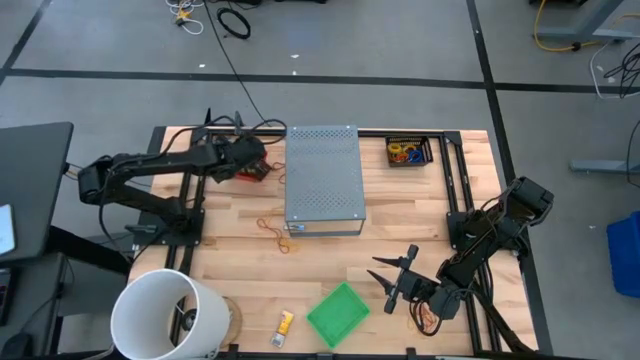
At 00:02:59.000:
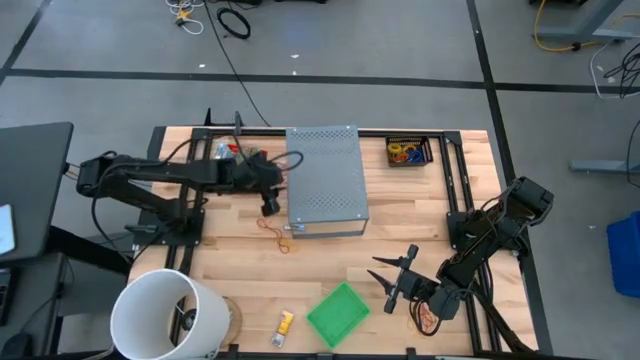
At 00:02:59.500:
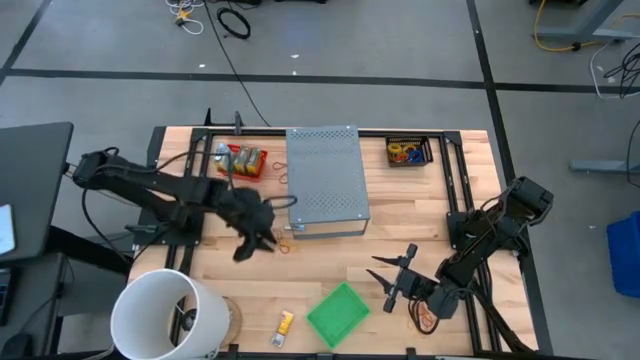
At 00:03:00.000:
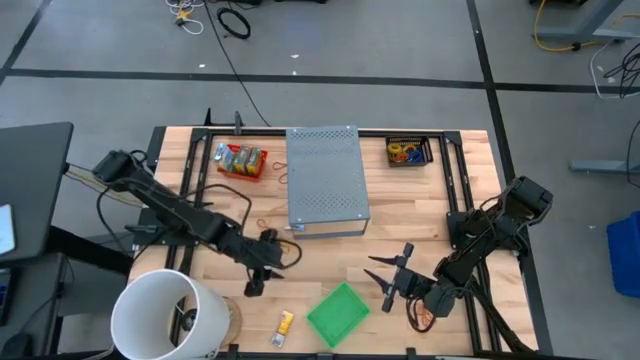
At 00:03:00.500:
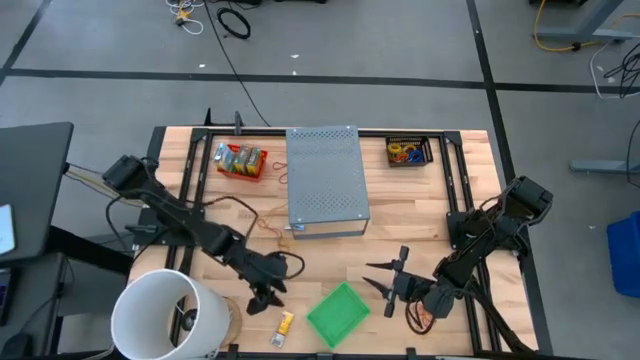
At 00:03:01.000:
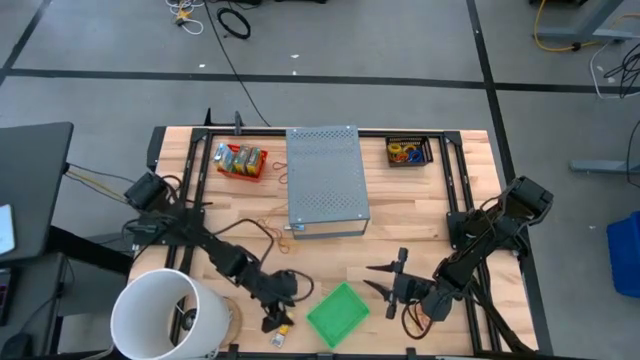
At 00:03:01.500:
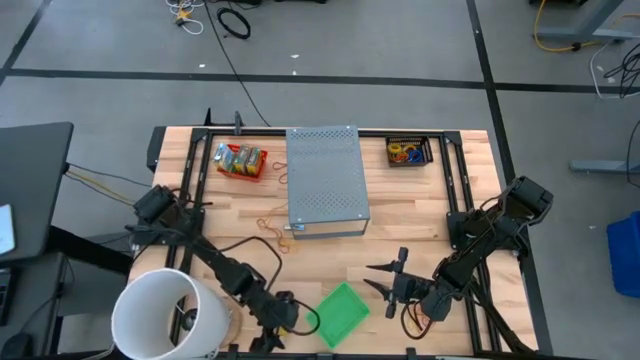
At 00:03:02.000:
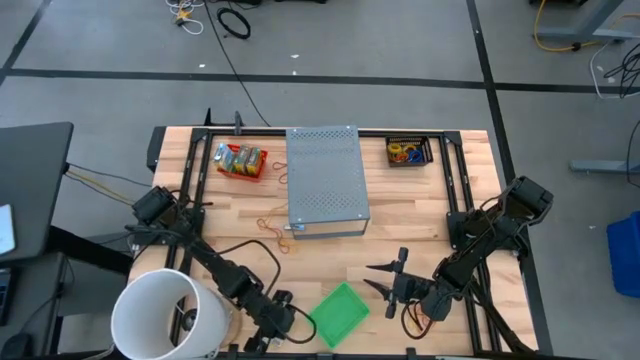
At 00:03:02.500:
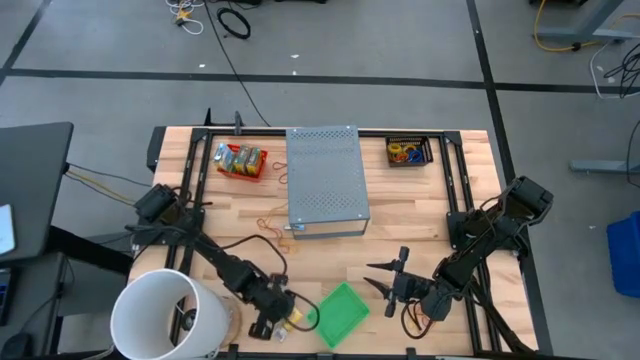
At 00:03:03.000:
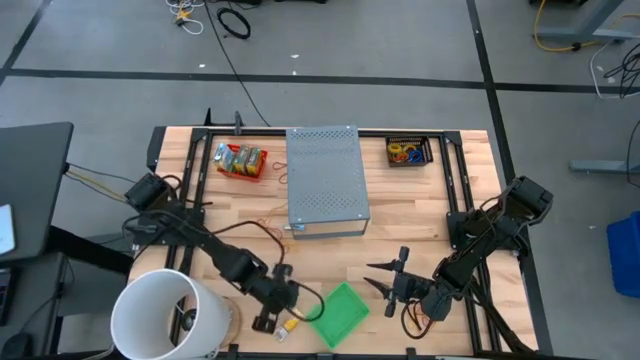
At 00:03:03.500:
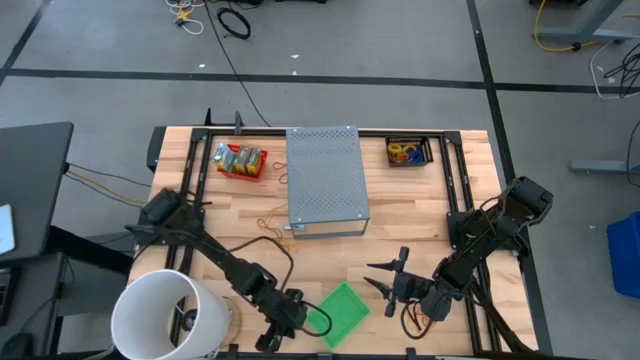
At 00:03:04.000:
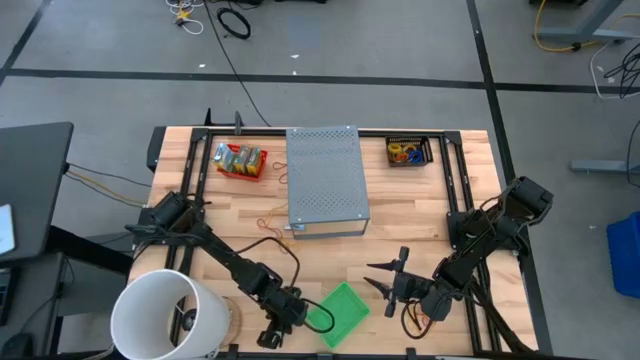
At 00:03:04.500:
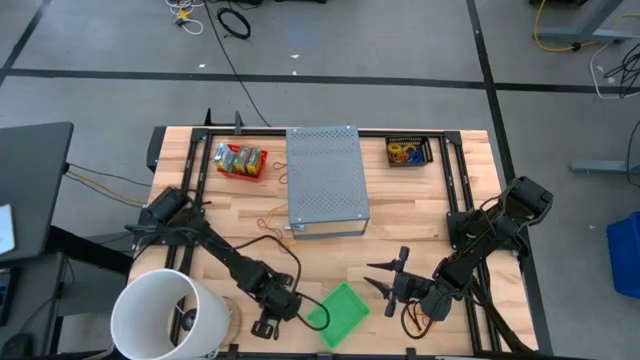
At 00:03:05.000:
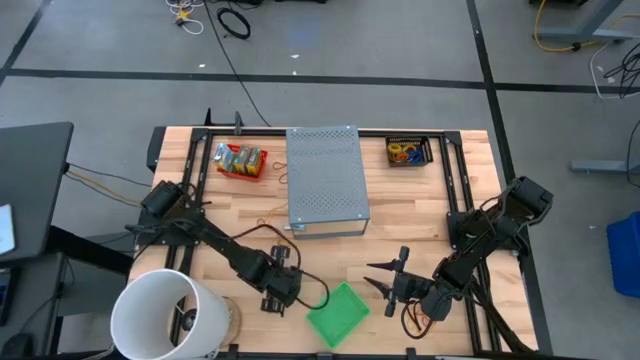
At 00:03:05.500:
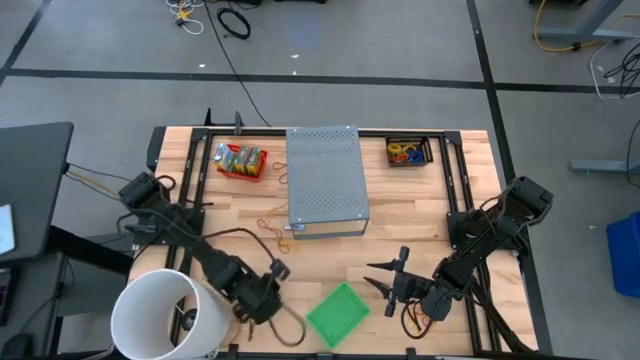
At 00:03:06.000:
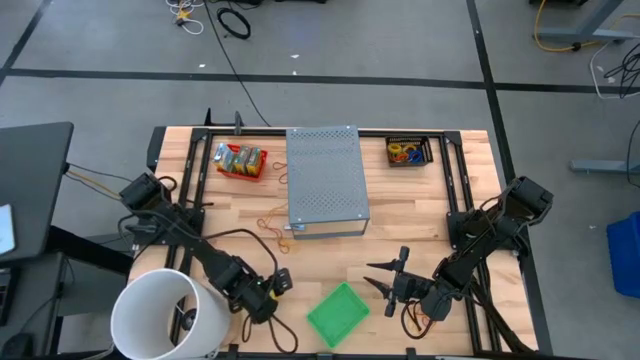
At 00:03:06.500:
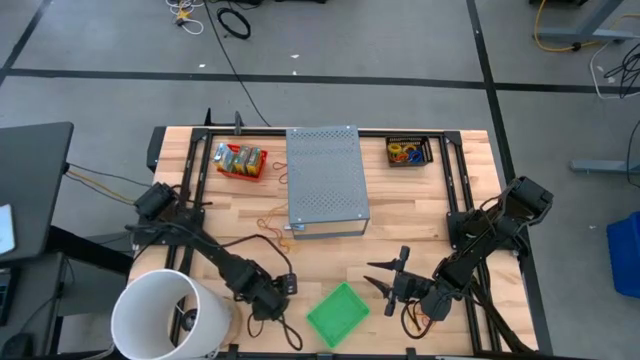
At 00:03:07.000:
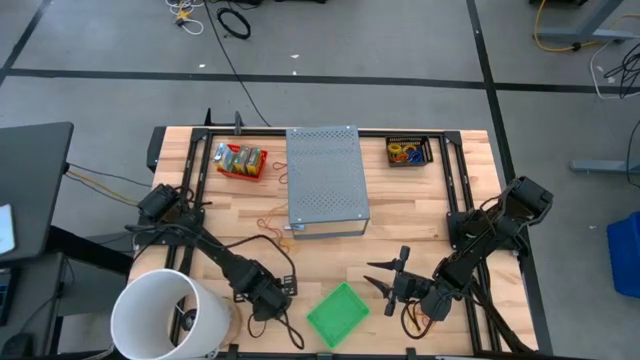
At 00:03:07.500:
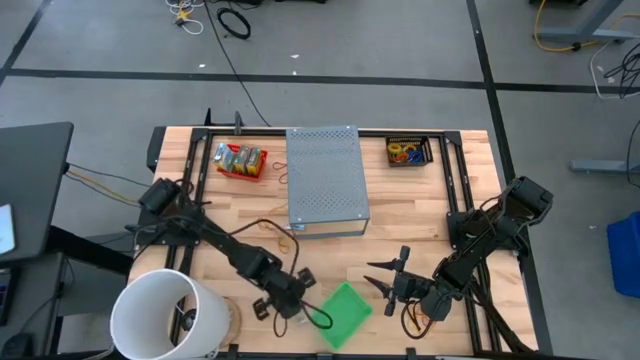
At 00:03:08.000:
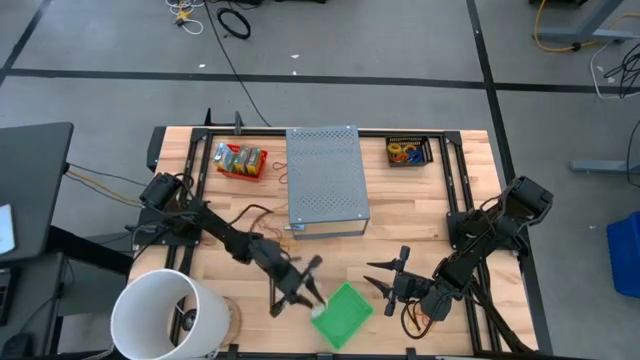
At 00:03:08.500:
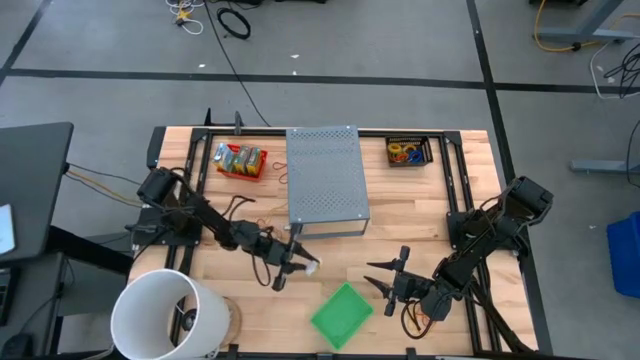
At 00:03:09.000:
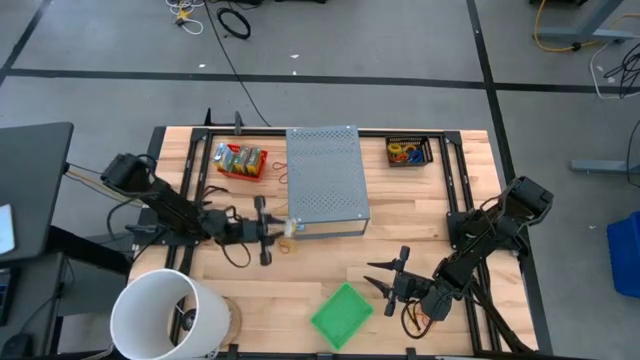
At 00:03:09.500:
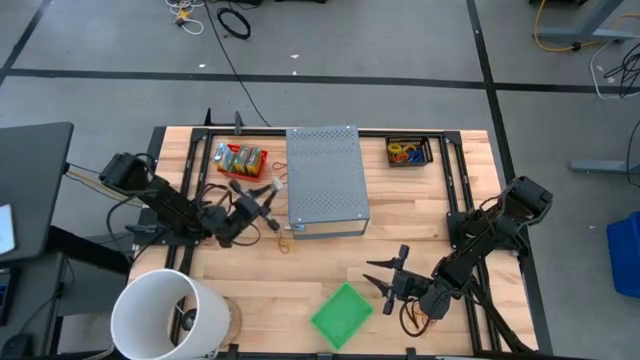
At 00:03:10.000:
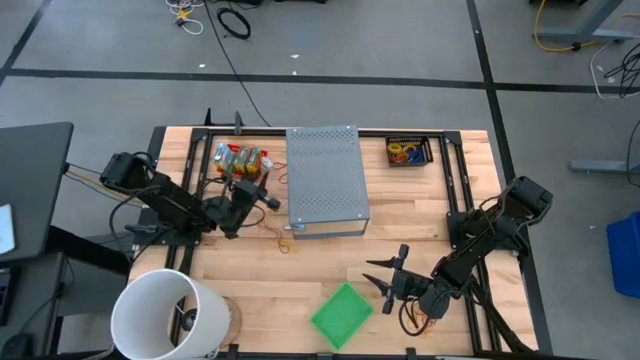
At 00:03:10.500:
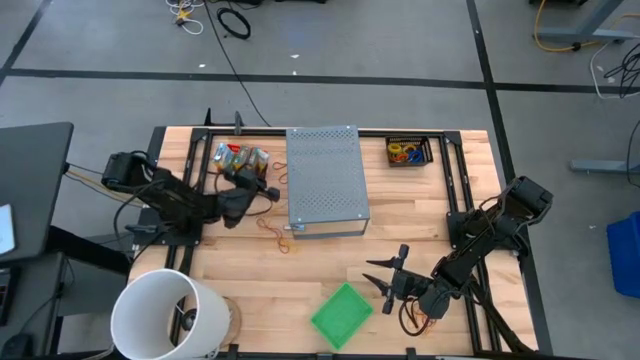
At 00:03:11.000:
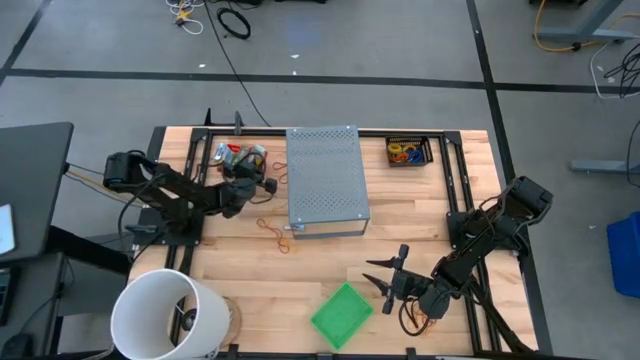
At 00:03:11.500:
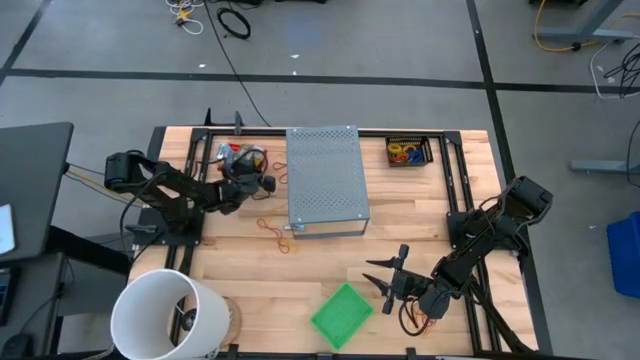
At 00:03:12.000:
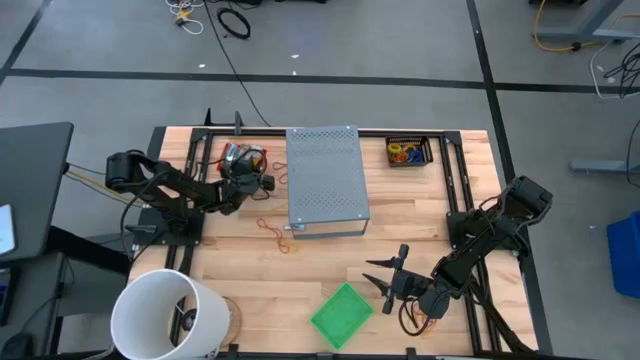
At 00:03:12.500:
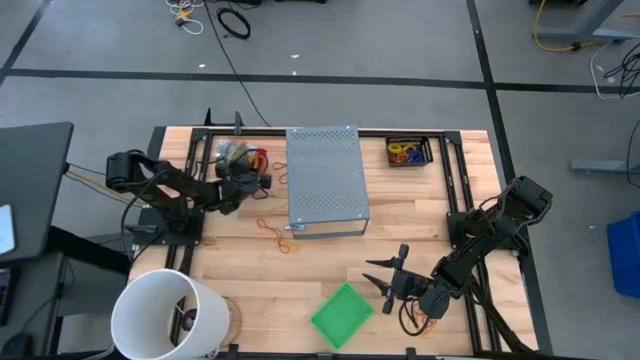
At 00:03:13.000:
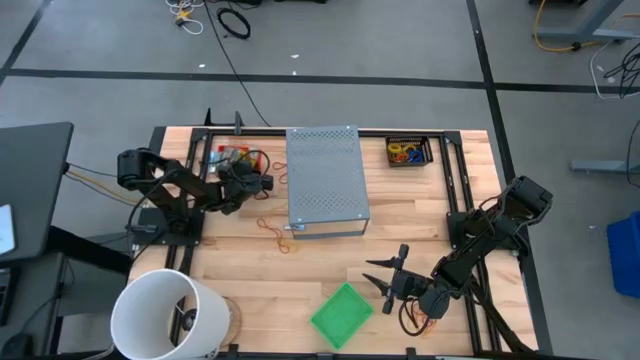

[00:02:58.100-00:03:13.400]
Task: Pick & Place Office Desk Supplies
Put the small yellow crayon box into the red basket

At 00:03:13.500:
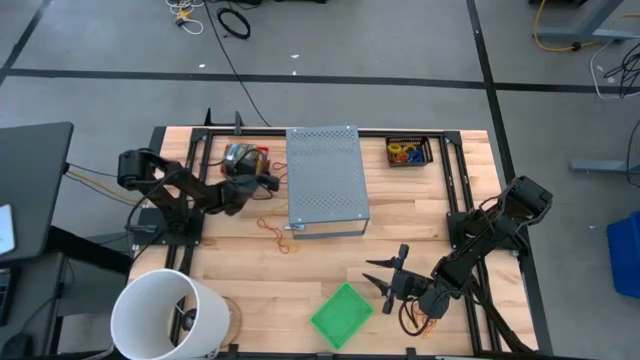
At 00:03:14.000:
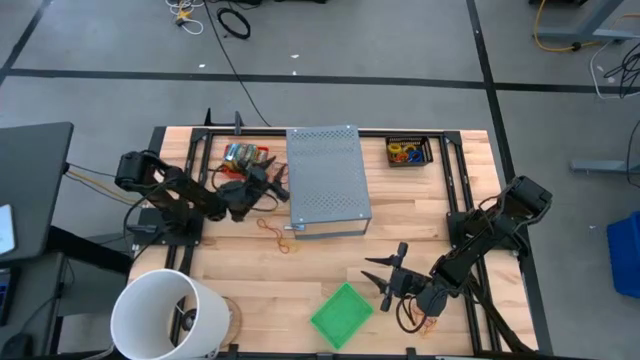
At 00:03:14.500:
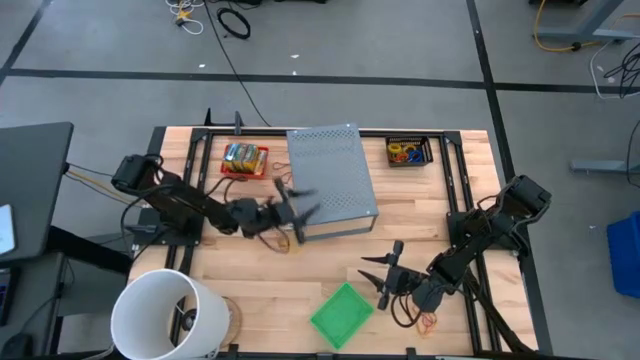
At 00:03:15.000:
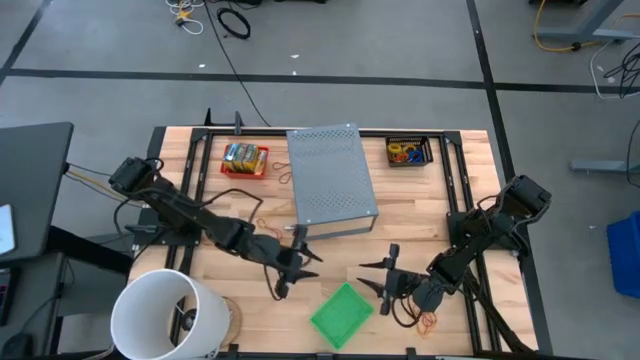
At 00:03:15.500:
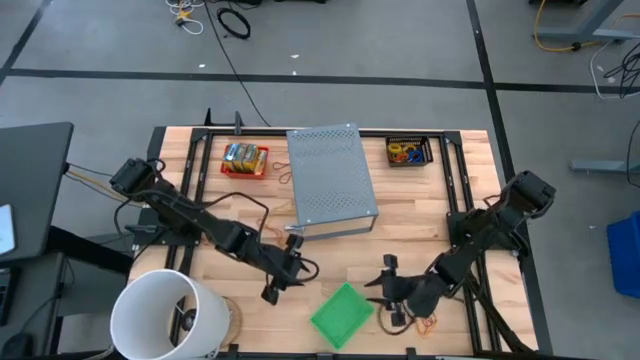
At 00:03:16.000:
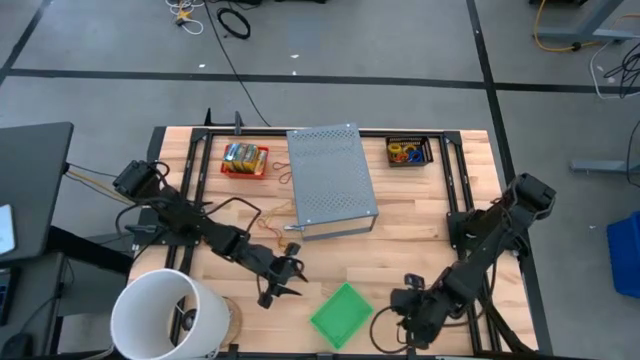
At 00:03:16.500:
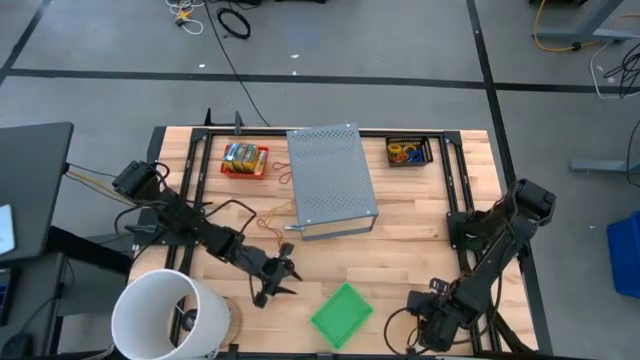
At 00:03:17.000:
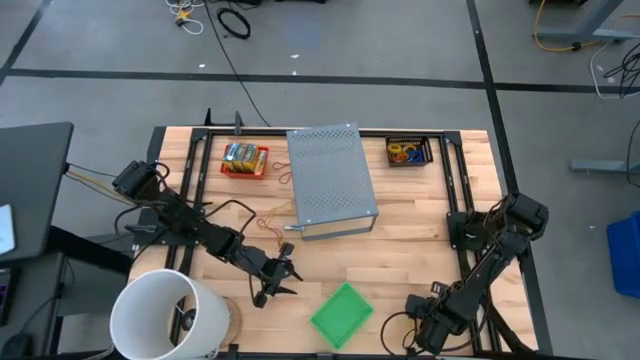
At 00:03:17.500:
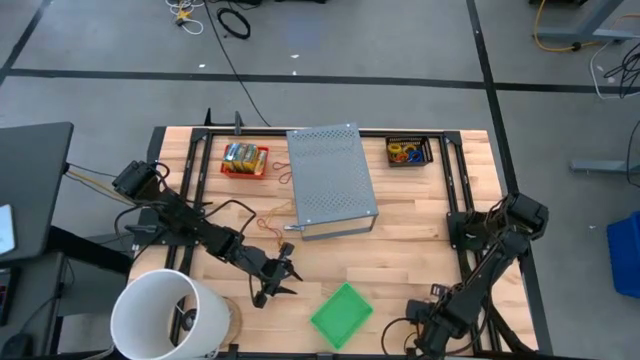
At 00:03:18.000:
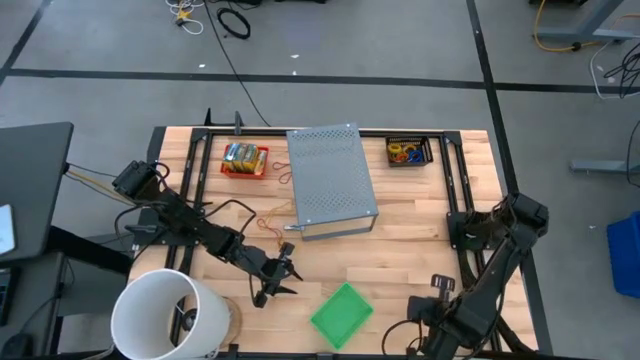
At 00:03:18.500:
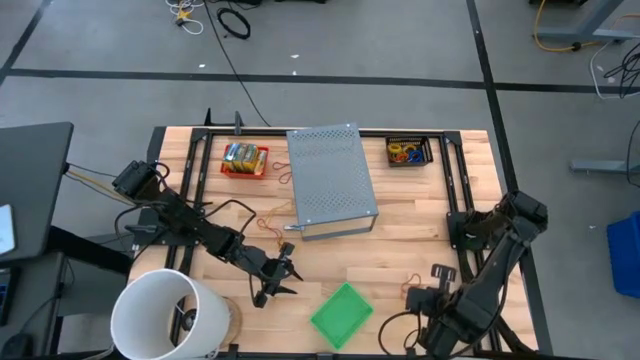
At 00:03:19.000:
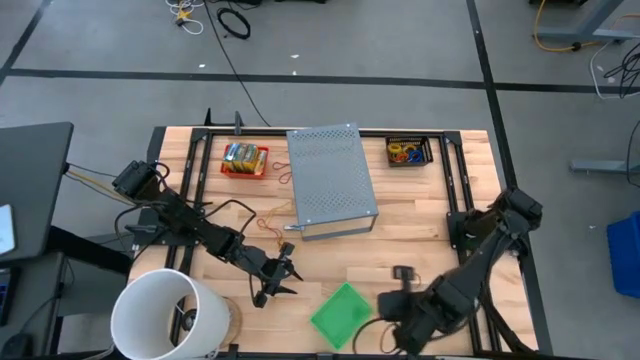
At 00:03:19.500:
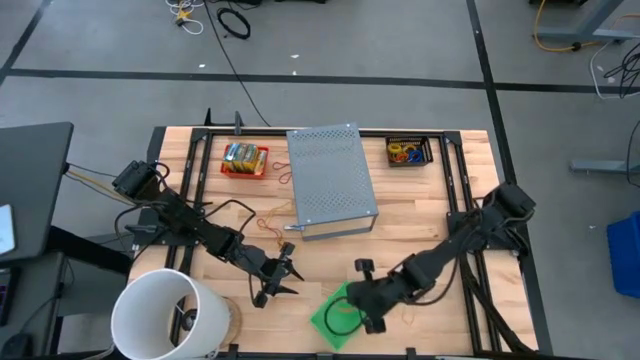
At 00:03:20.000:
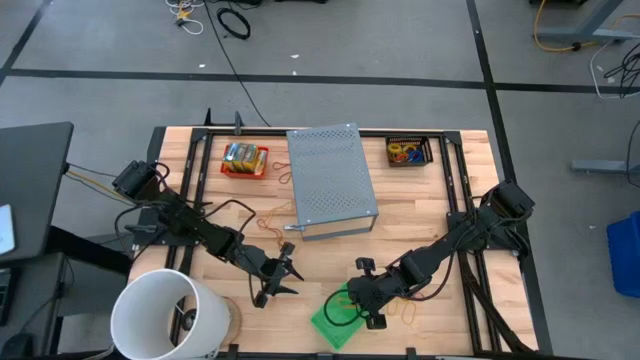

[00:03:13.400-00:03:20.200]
Put the orange rubber band into the green basket
